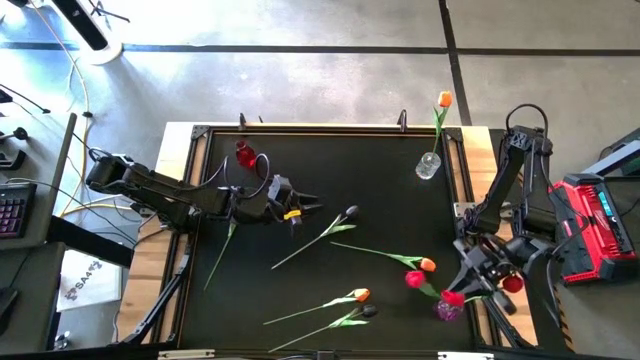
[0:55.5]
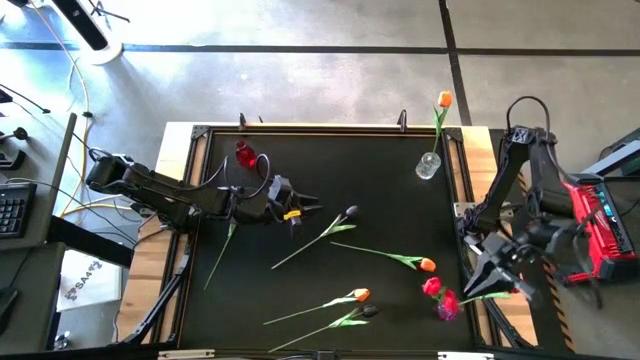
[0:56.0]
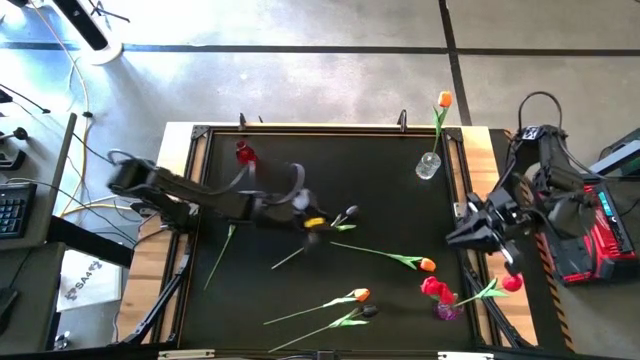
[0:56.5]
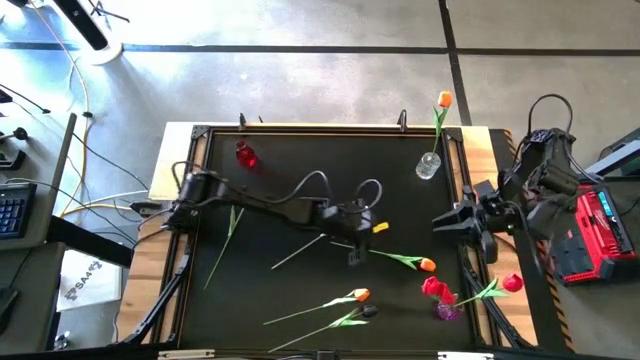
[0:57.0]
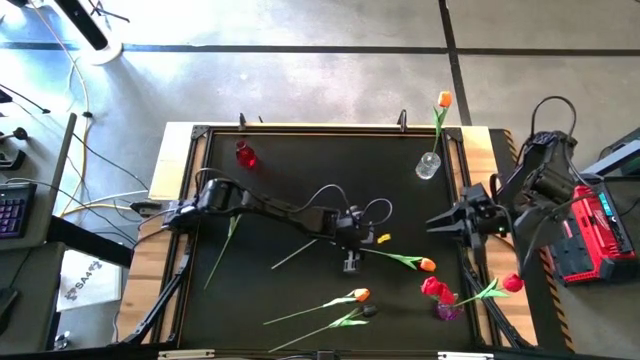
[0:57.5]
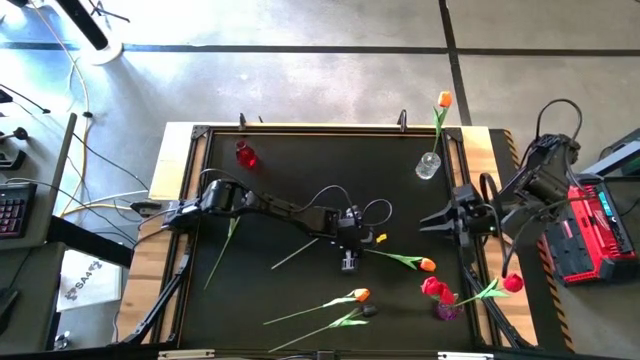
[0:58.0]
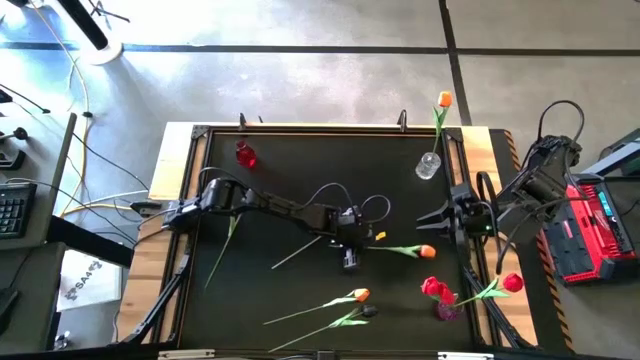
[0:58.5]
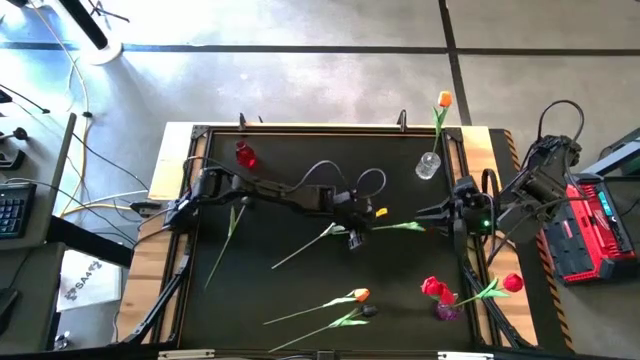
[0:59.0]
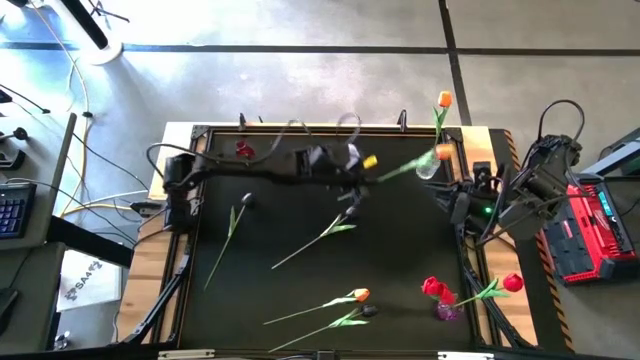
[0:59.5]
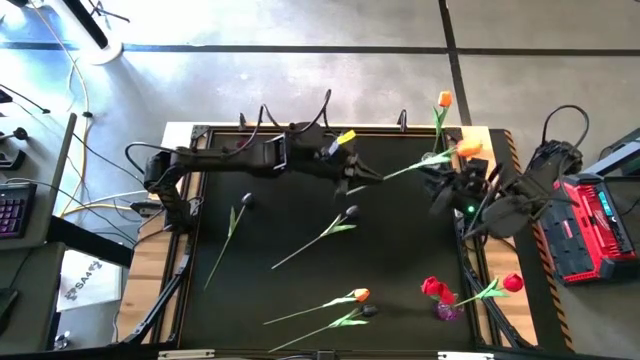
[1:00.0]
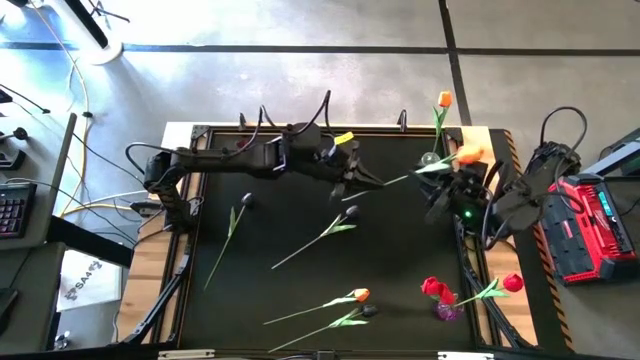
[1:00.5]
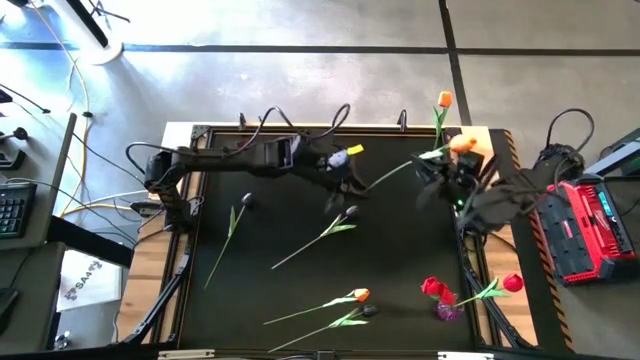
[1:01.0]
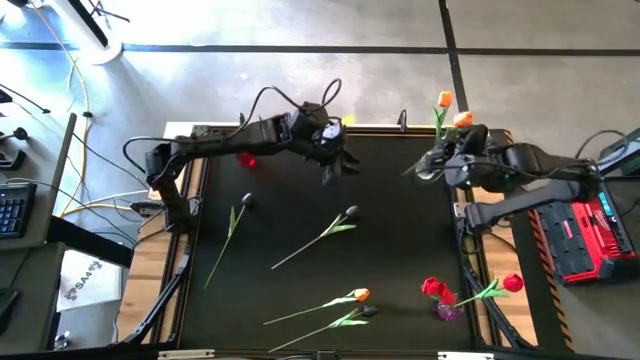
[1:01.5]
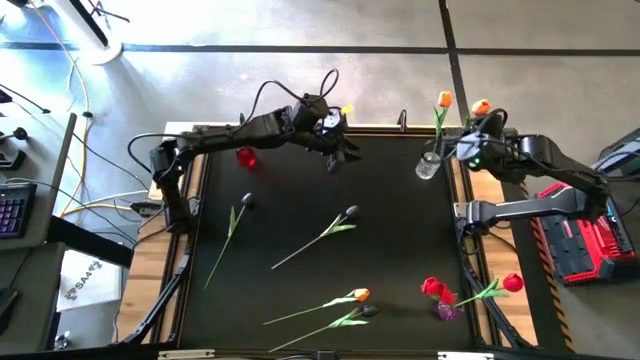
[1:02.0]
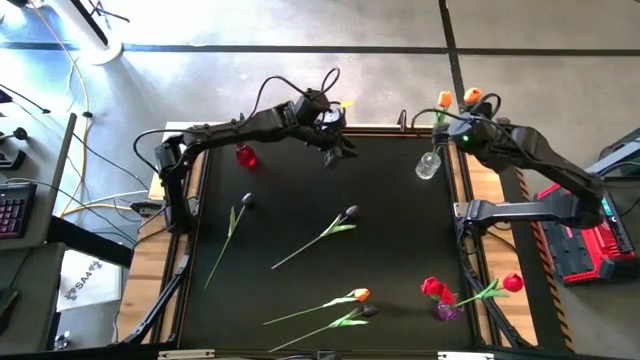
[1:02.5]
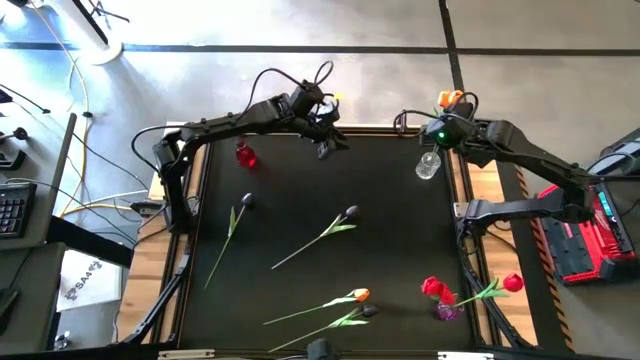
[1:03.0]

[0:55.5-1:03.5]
Task: Sort flowers into vase by color
Put the top orange tulip into the transparent vase

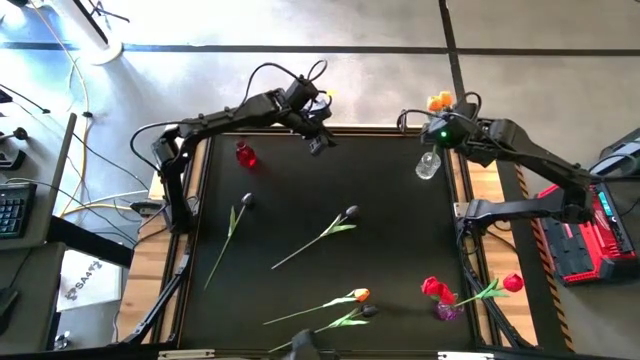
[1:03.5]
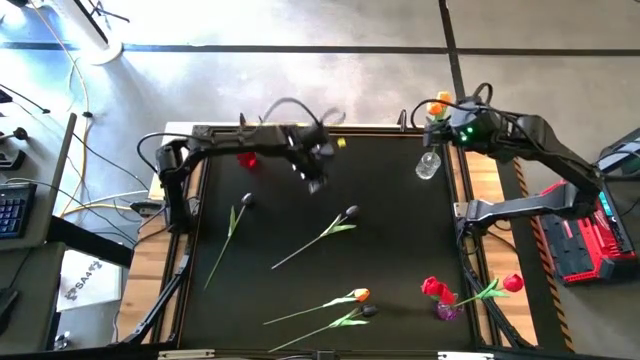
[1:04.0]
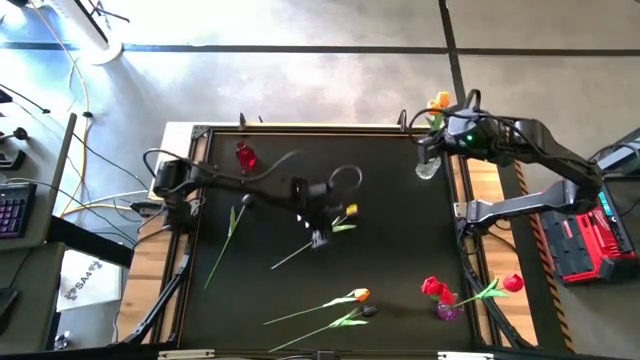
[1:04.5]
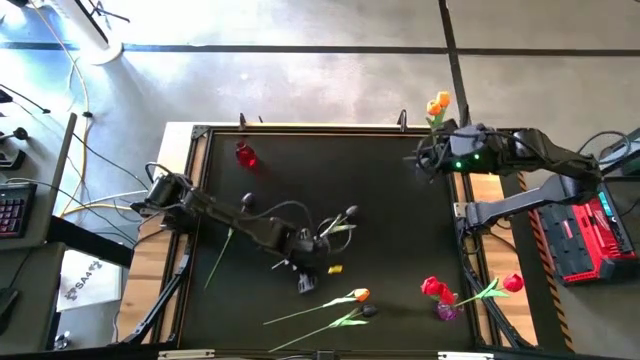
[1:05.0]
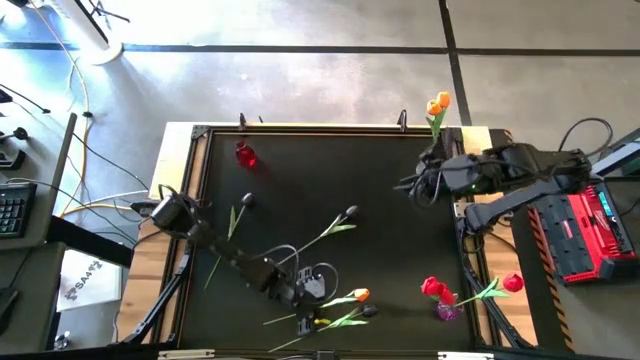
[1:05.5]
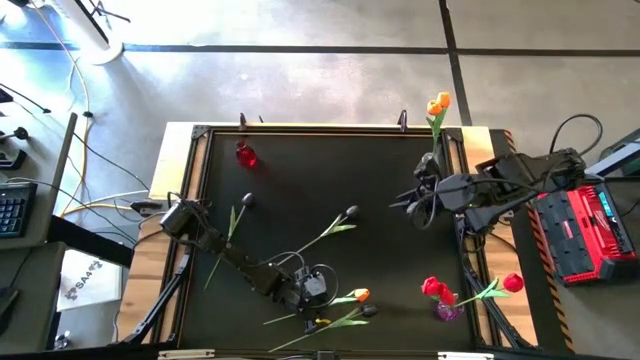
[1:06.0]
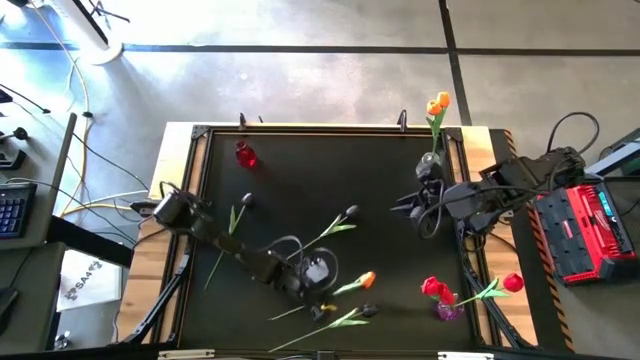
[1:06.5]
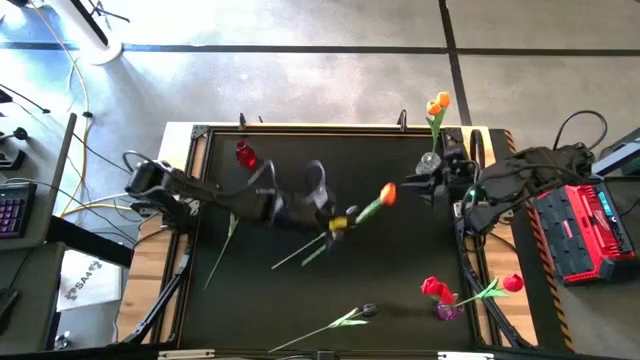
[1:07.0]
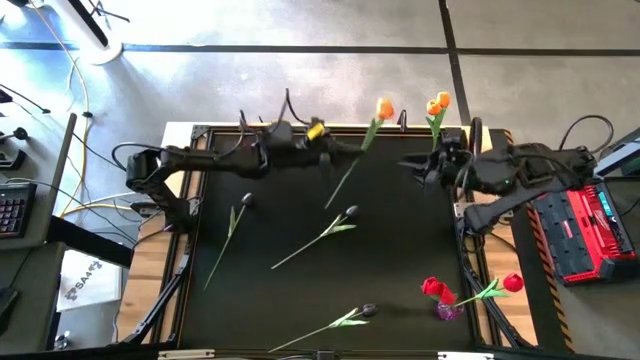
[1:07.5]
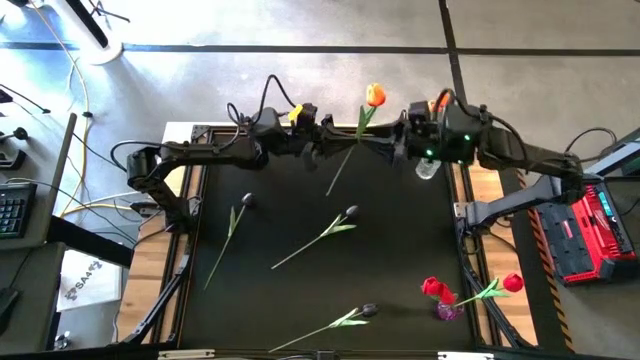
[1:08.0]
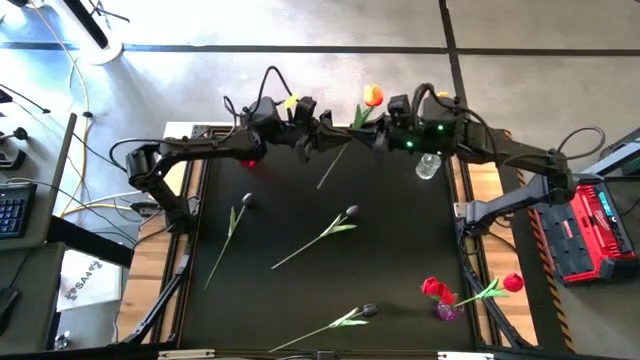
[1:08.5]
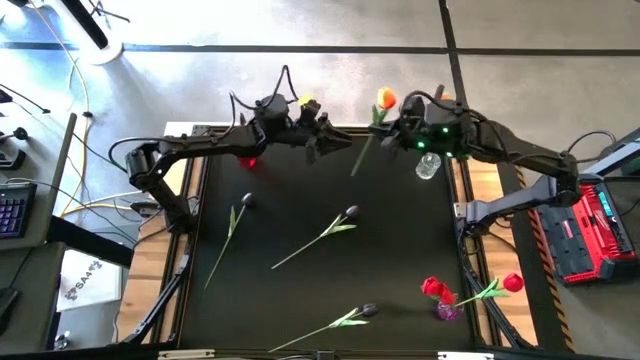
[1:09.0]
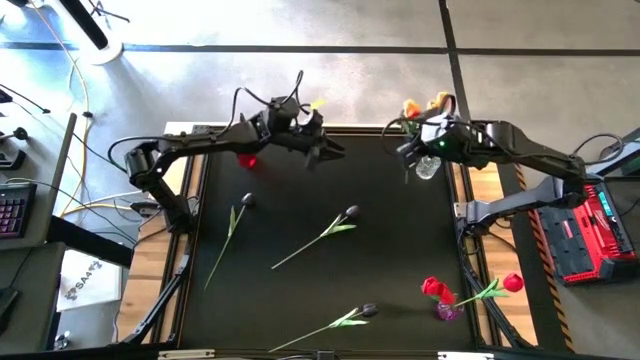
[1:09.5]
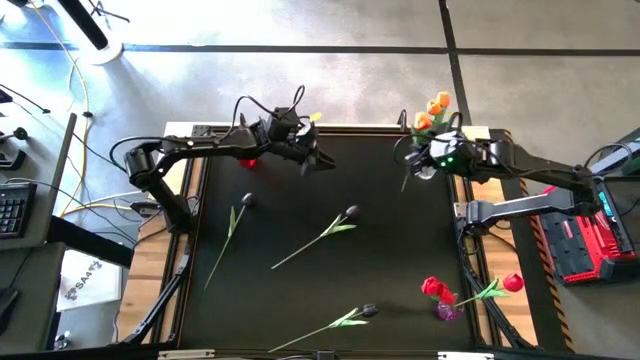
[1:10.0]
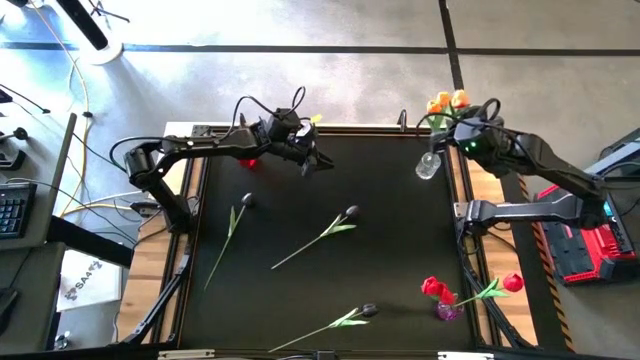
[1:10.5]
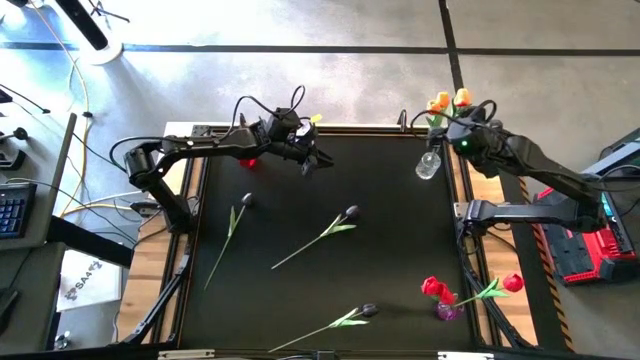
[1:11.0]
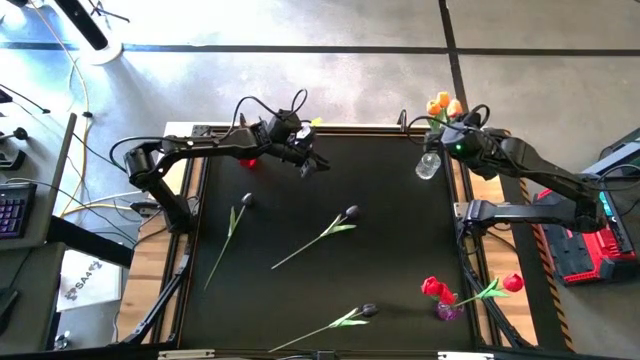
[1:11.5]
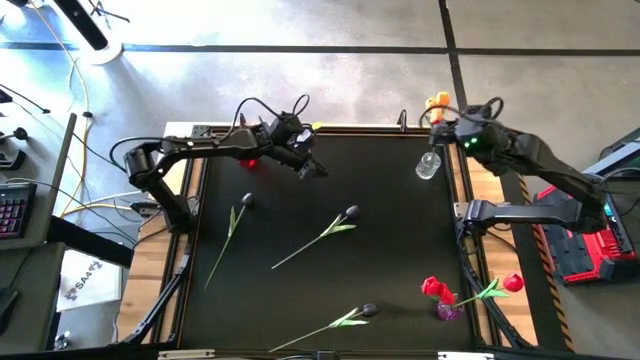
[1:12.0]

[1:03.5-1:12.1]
Put the orange tulip into the transparent vase

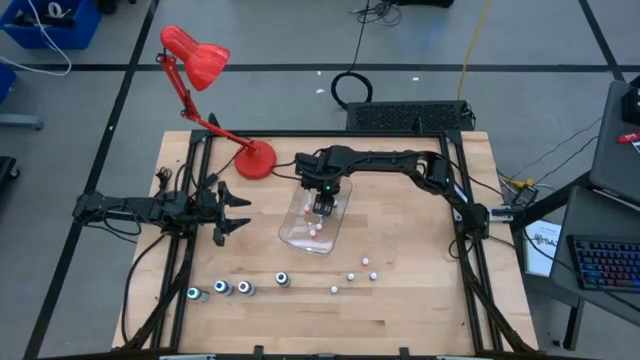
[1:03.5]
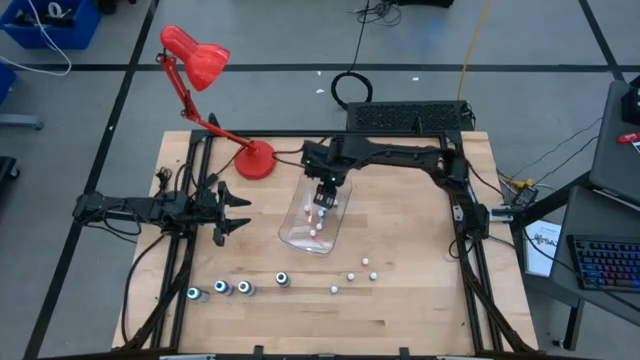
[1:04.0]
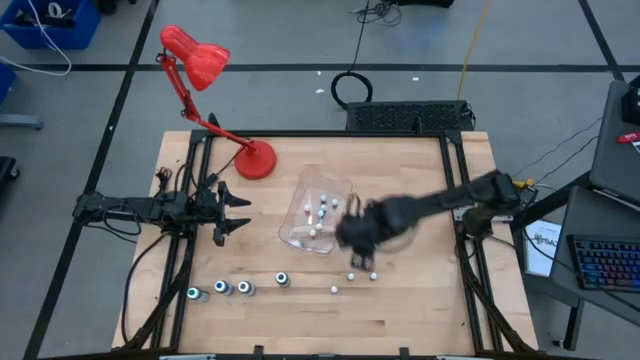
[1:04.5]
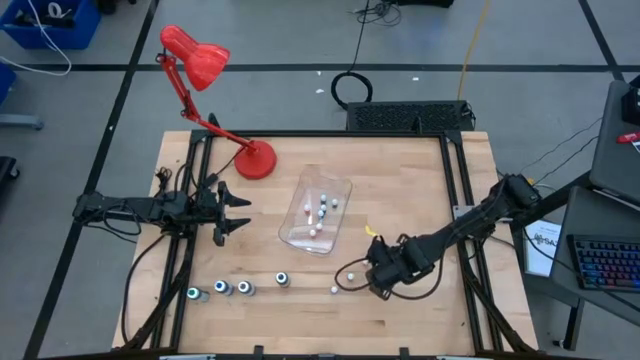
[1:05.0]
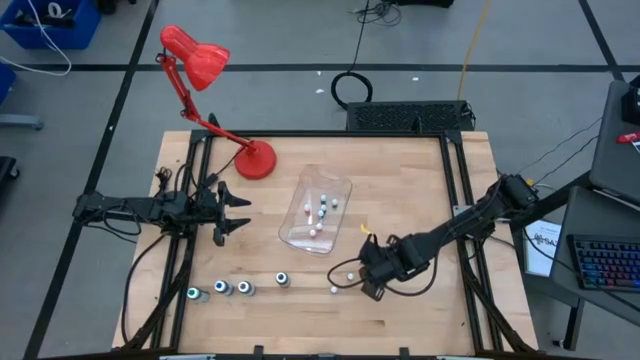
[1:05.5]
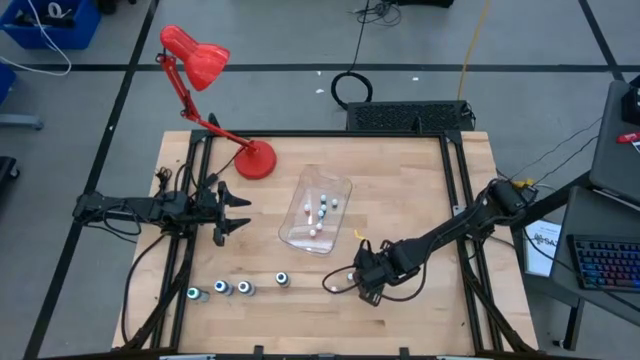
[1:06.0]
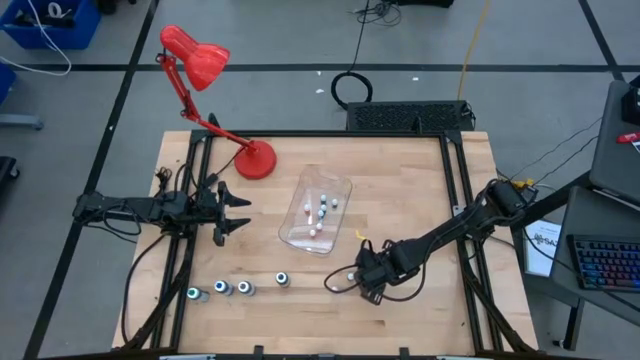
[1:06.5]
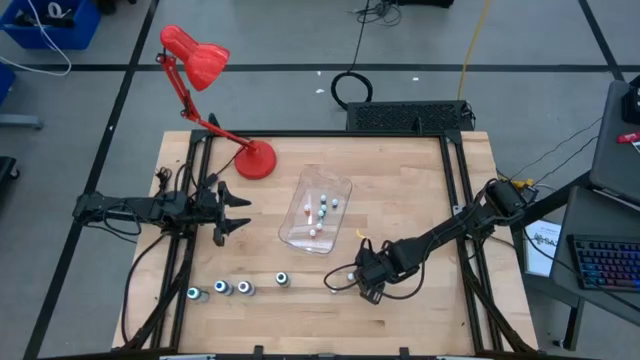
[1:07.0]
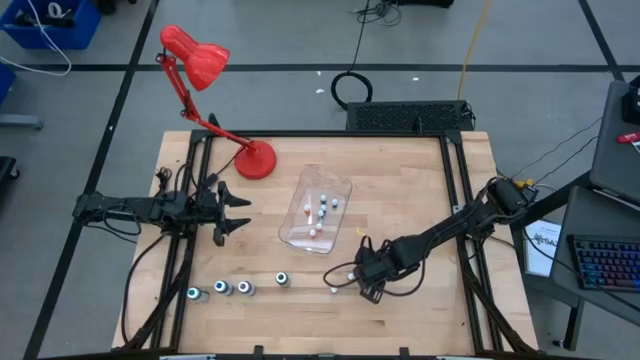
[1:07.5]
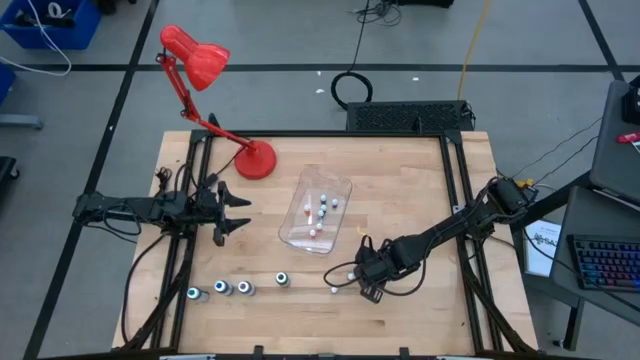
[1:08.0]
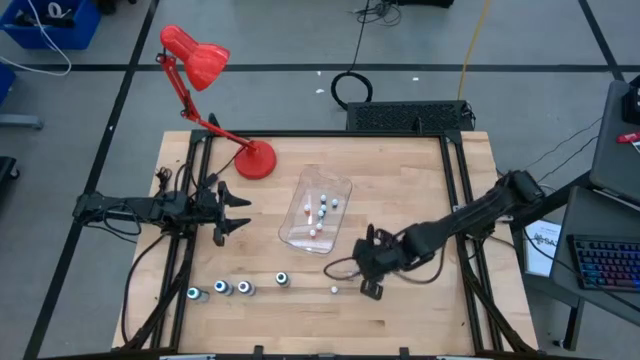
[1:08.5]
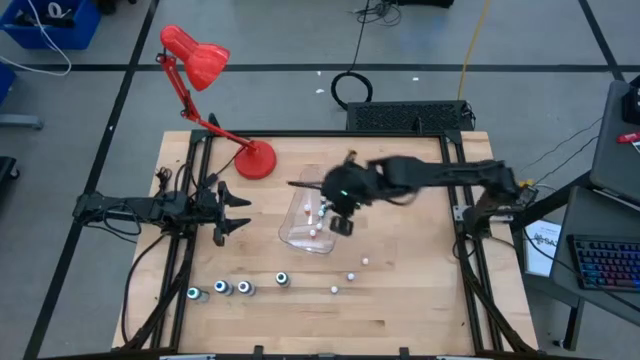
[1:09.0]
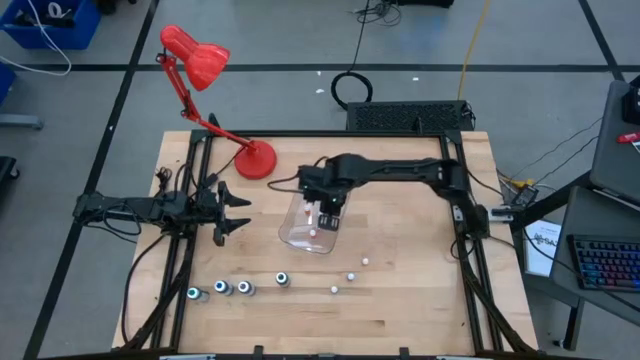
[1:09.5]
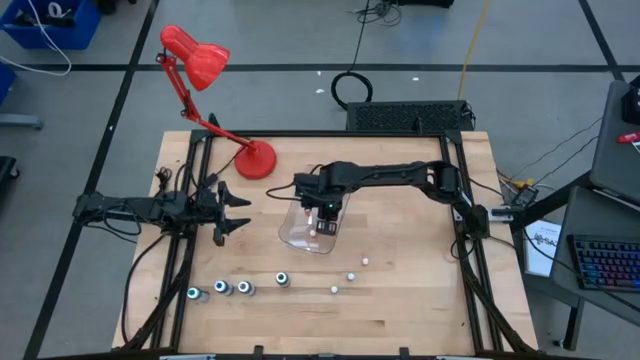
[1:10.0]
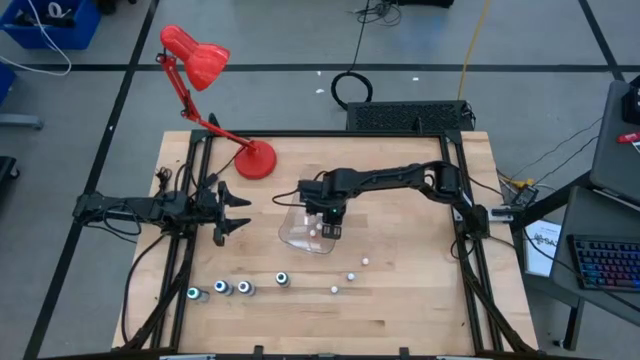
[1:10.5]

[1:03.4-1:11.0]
Task: Pick & Place food coloring
Put the small green food coloring bottle into the transparent bin
